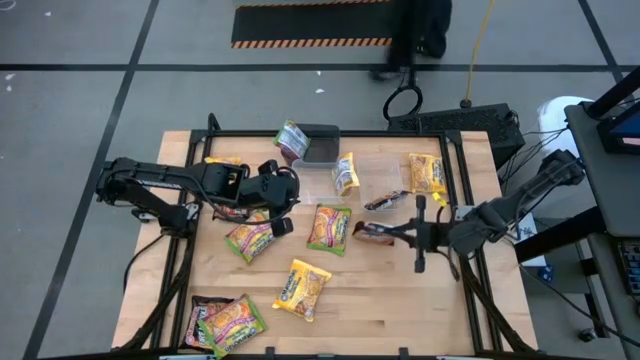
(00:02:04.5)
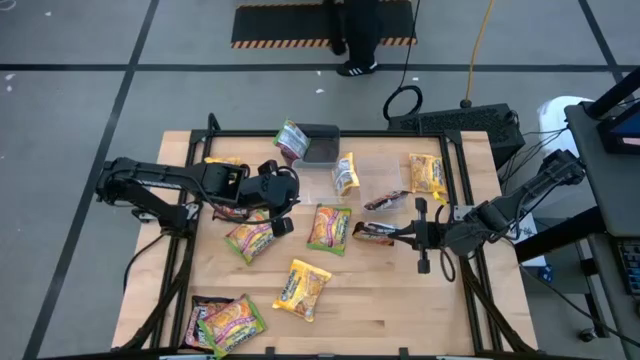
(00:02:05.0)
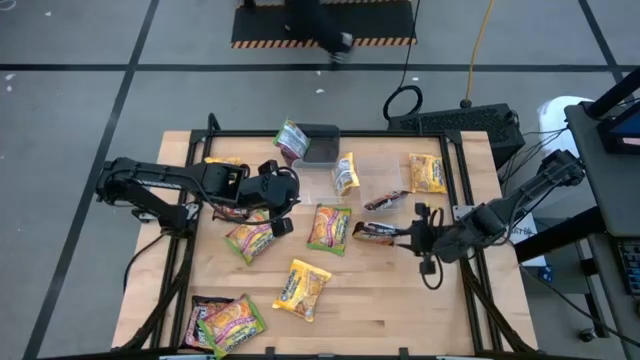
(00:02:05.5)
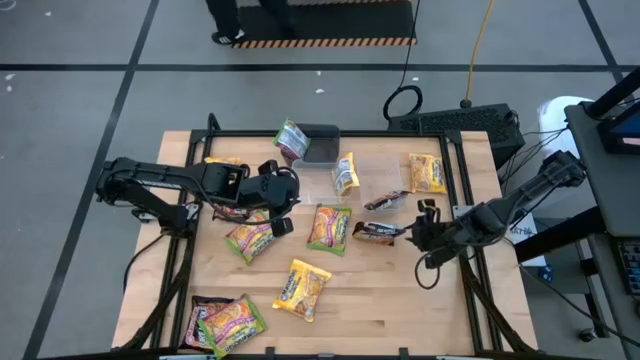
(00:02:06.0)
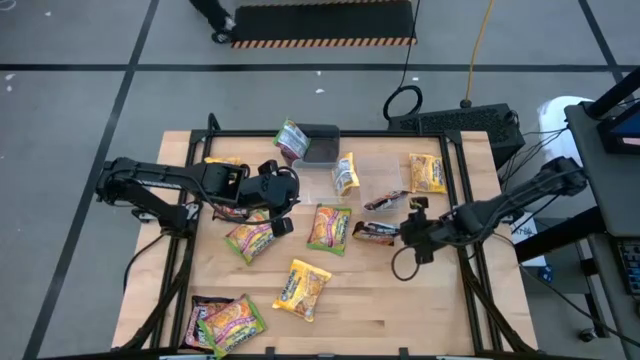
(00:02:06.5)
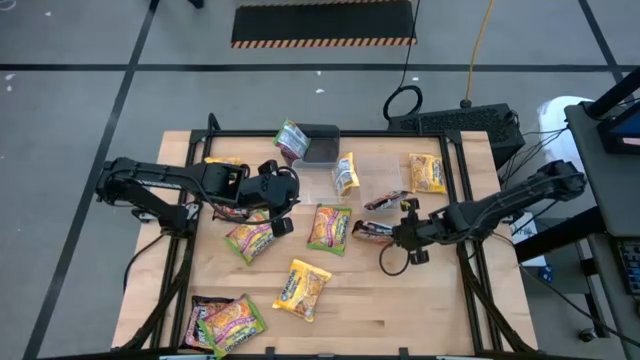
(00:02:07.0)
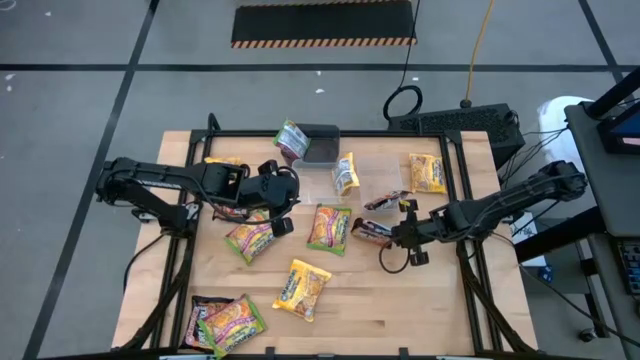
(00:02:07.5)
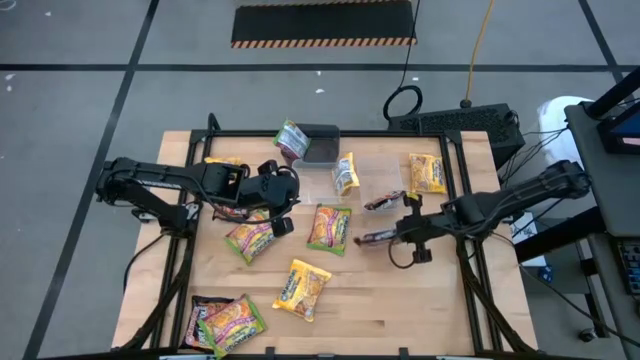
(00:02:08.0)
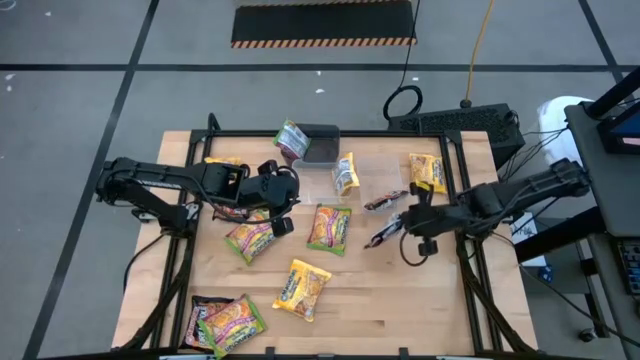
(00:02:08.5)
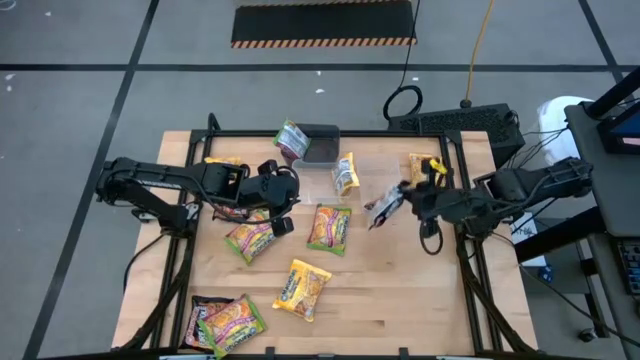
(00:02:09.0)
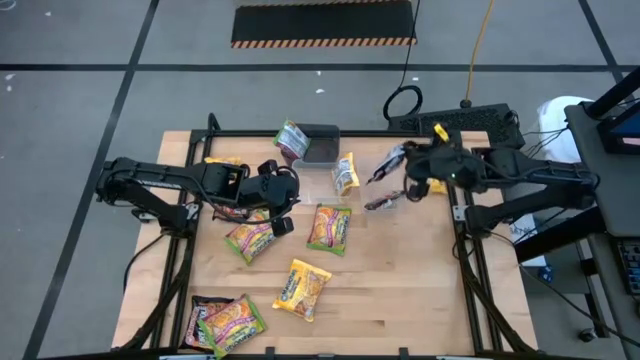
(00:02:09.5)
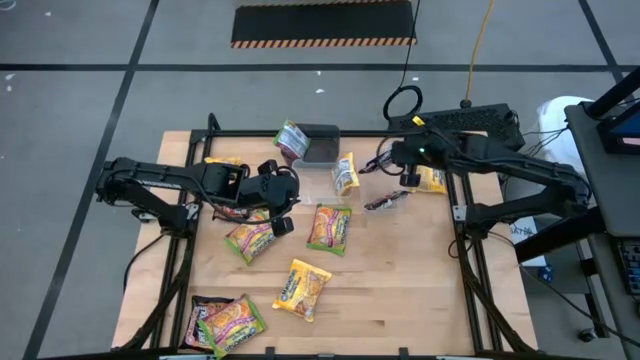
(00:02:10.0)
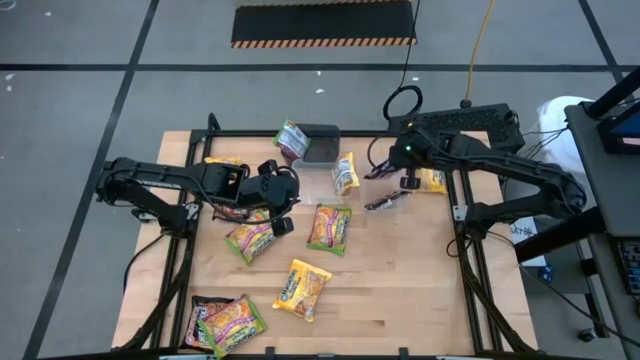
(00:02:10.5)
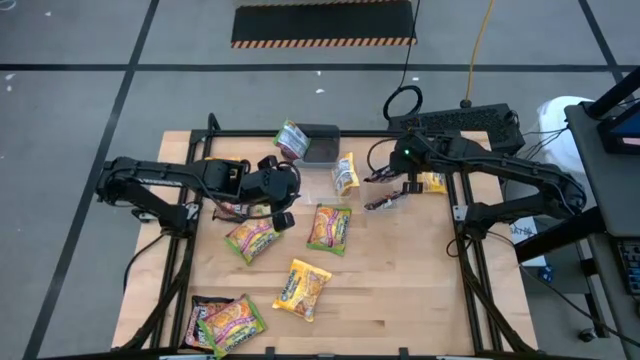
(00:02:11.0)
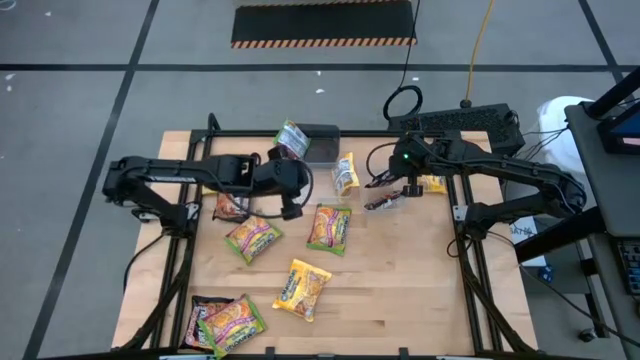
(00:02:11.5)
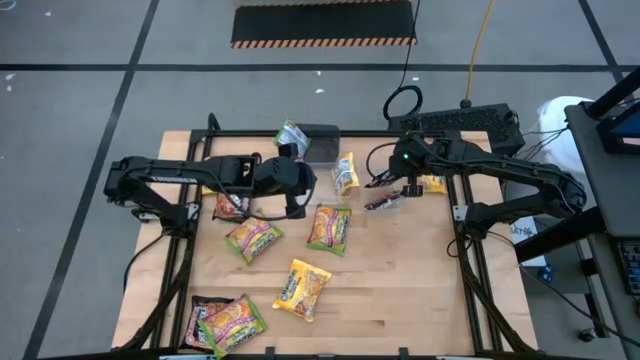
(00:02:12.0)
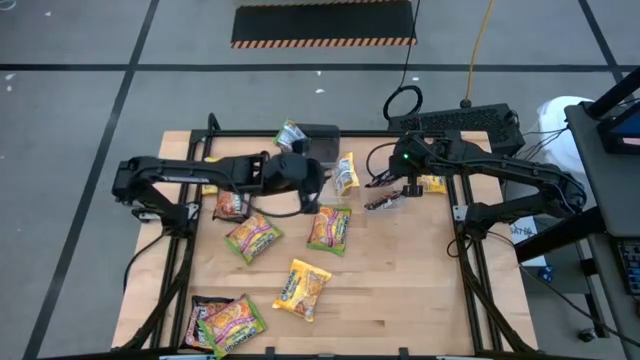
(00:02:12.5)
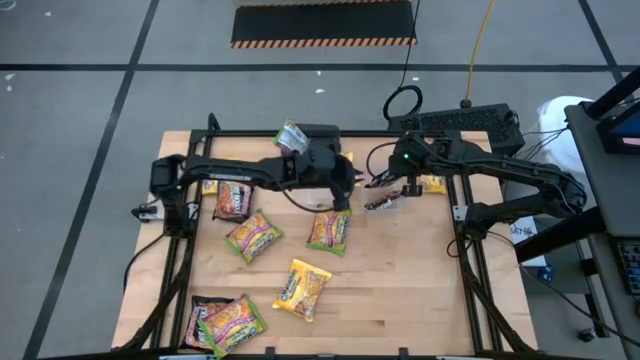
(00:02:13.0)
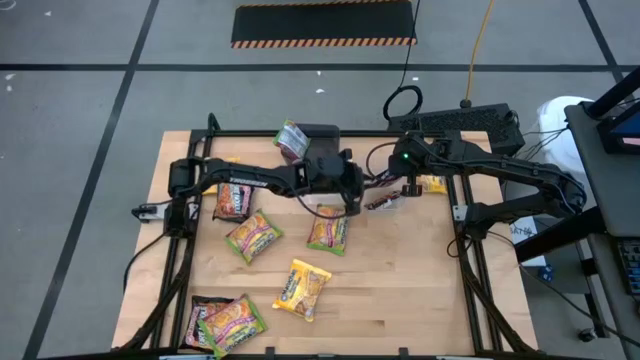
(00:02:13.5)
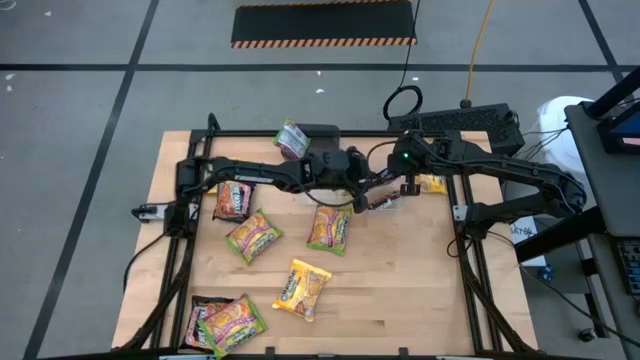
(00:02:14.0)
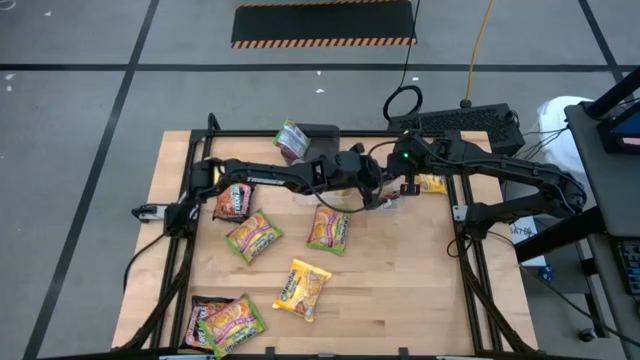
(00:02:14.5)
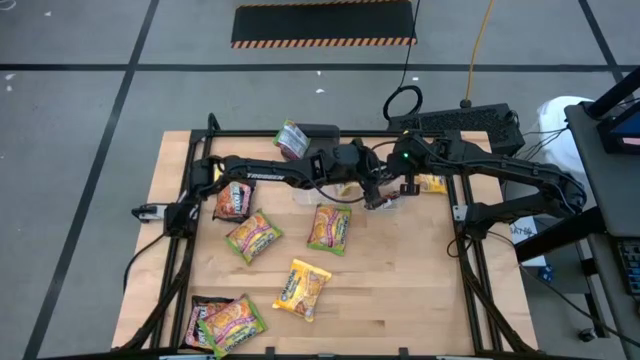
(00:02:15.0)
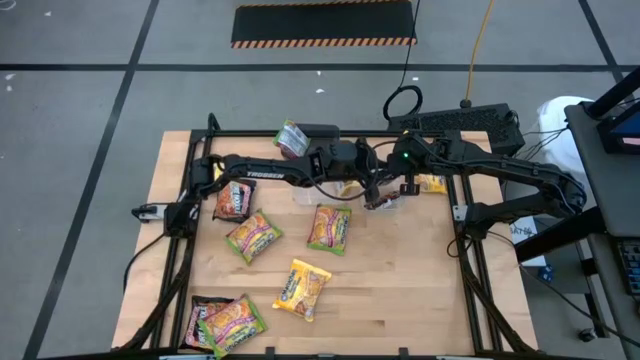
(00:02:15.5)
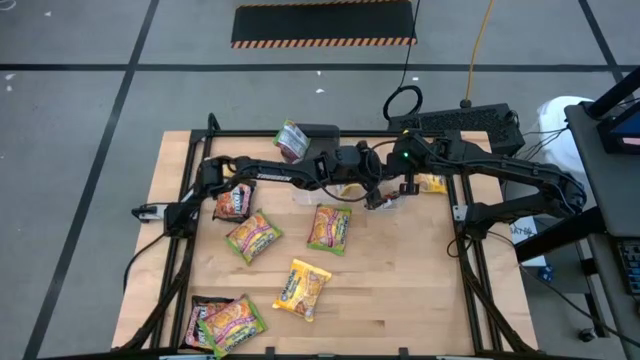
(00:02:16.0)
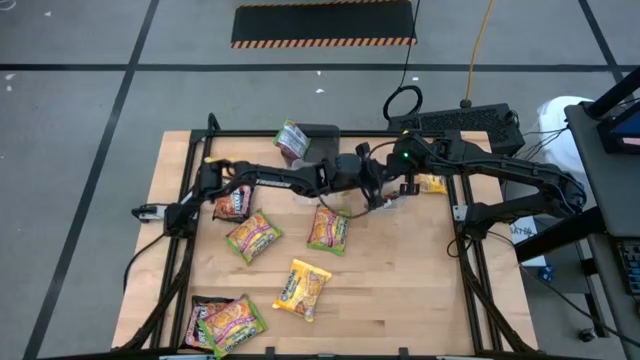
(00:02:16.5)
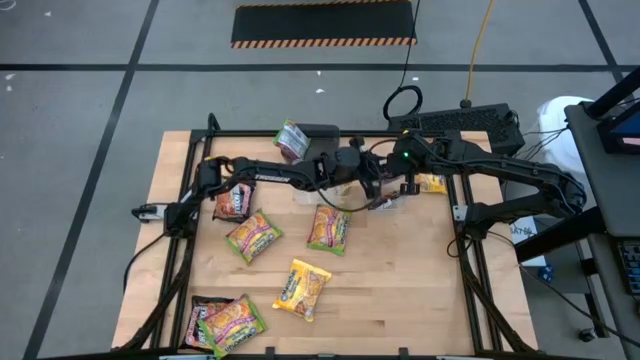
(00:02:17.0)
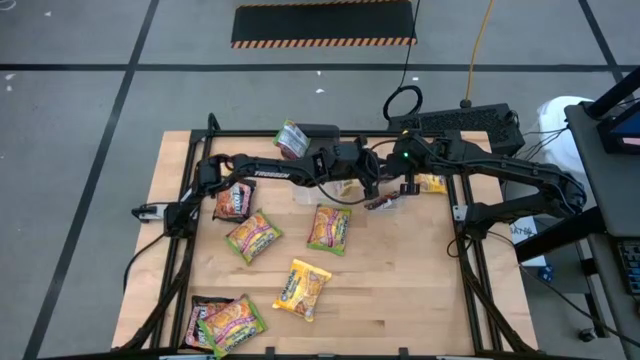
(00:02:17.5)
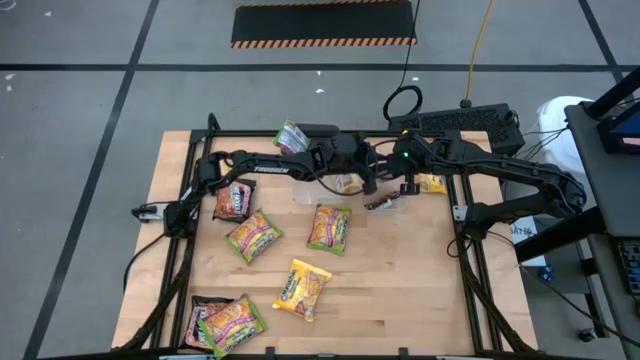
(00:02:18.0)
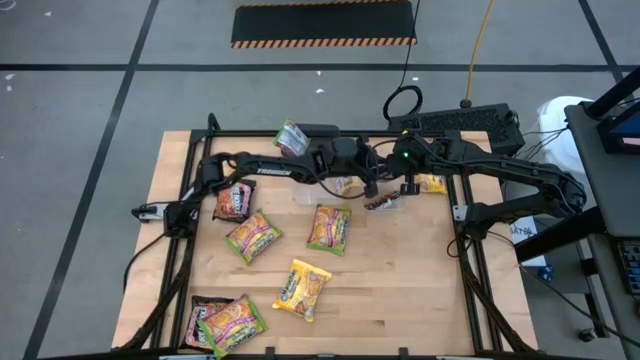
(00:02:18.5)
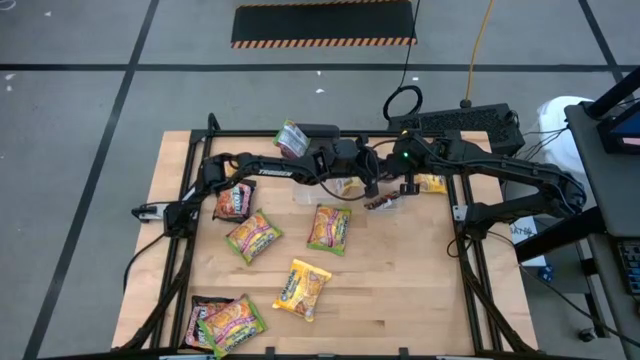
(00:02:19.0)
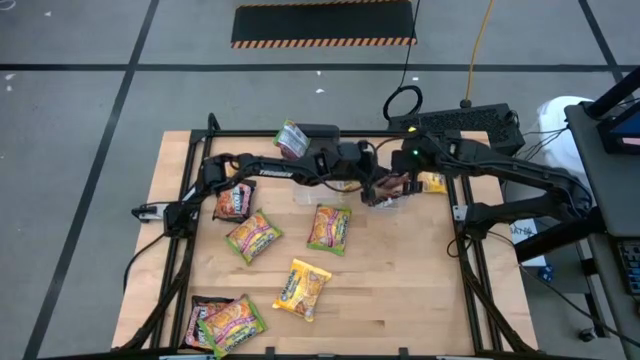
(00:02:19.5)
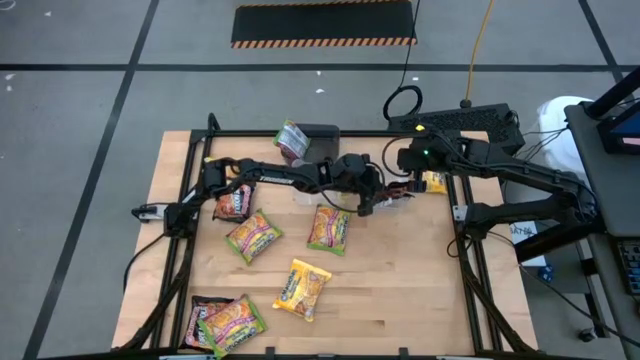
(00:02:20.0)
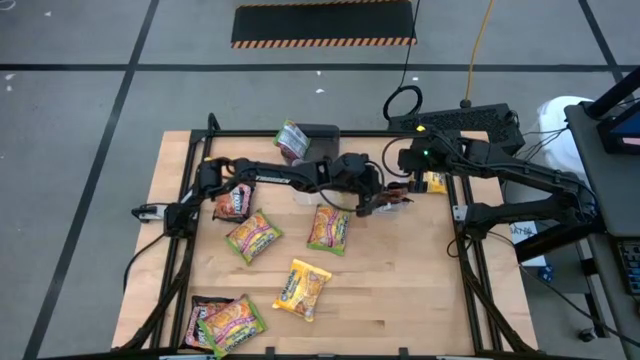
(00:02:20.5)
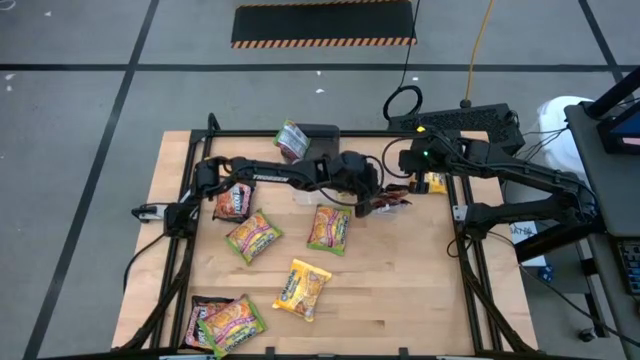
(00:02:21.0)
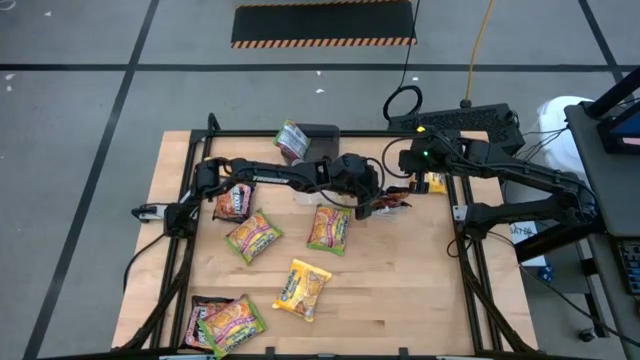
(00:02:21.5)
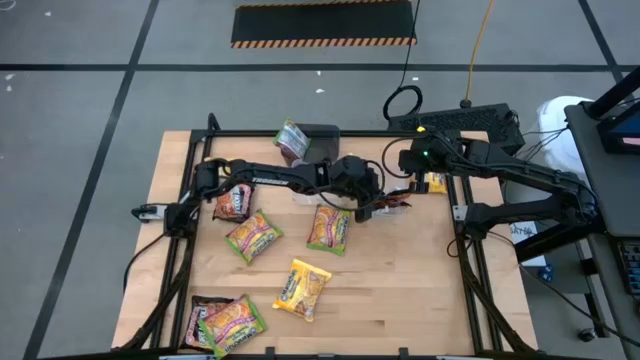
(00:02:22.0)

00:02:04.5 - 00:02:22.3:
Task: Sort Maruchan noodles
Put the black noodle pack into the right transparent bin

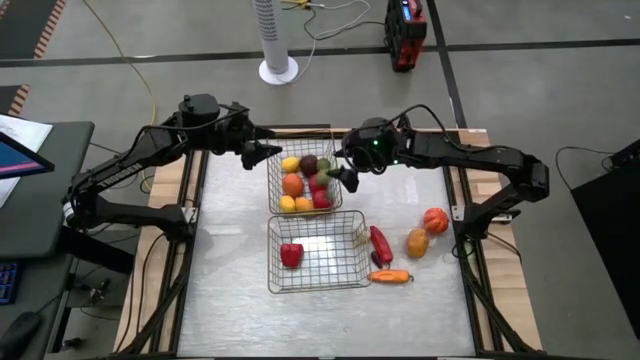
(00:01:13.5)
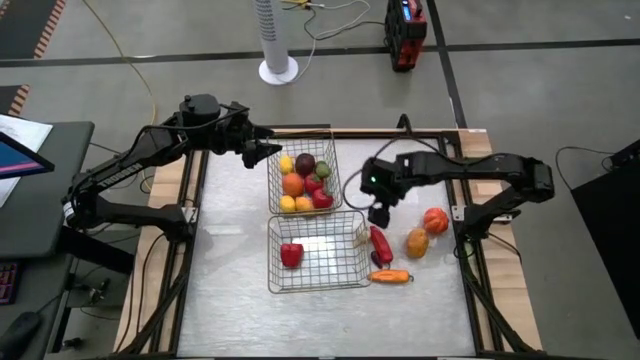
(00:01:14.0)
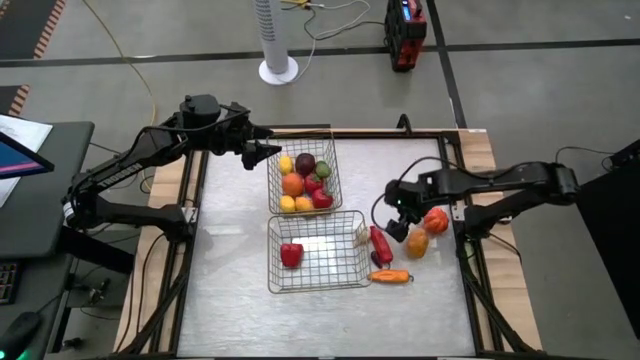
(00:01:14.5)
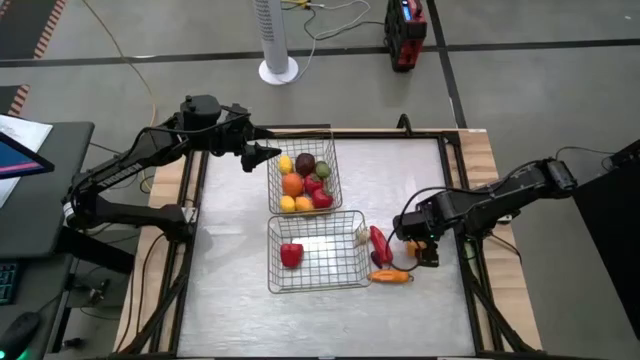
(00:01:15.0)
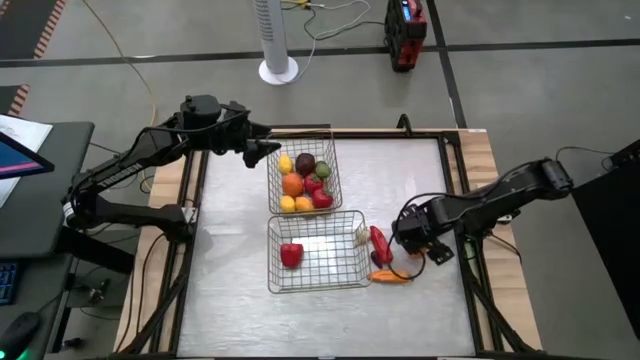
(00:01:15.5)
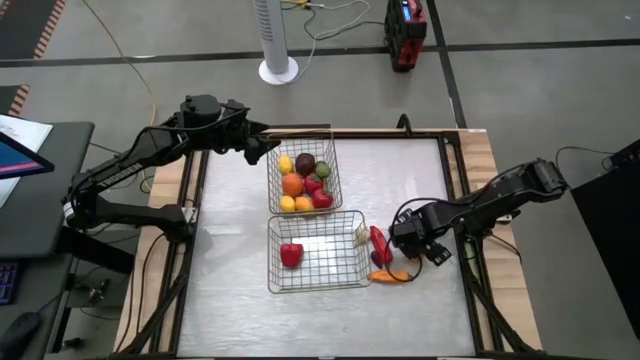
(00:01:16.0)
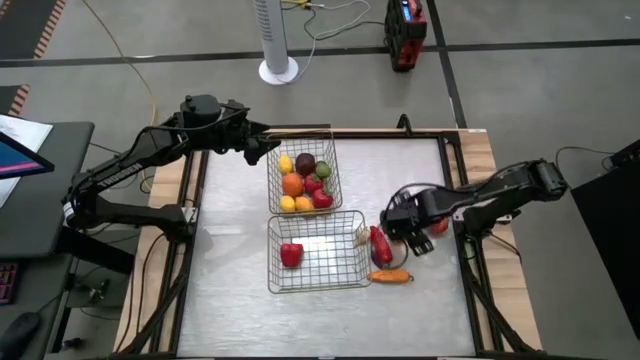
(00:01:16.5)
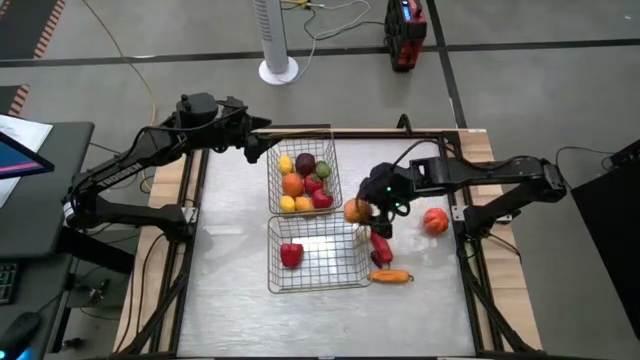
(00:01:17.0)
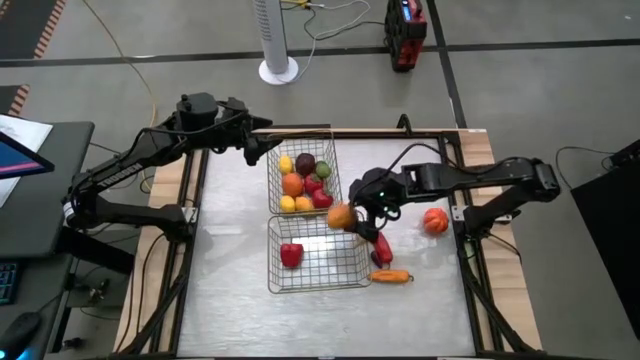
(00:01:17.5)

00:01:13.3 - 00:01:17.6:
Task: Sort produce into baskets
Put the brown potato into the bottom wire basket
